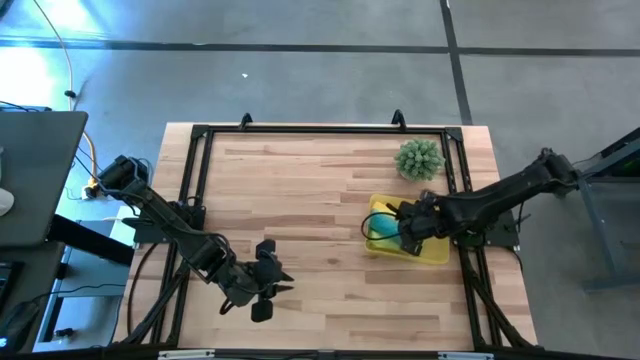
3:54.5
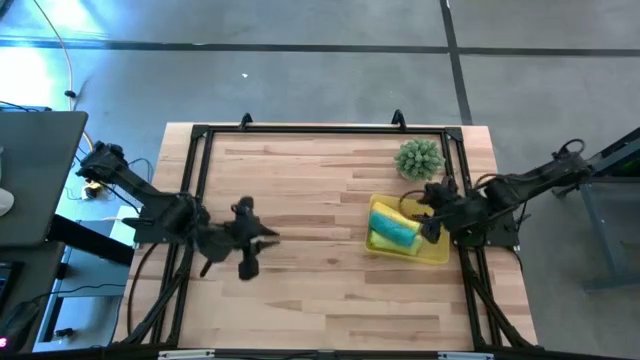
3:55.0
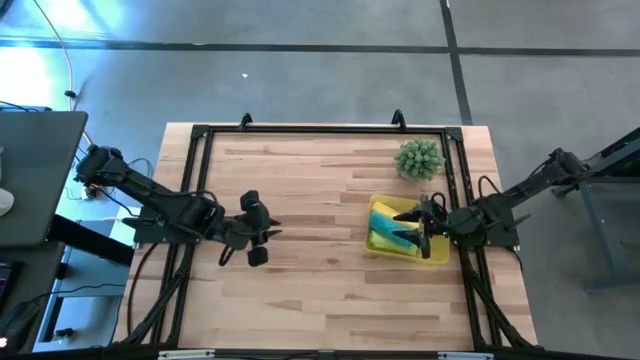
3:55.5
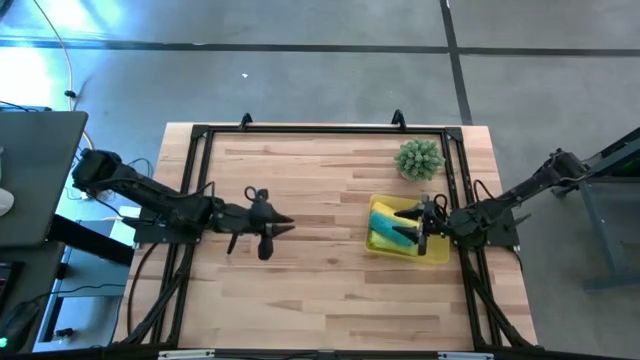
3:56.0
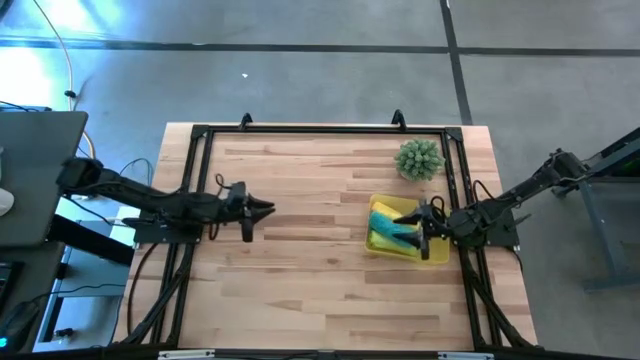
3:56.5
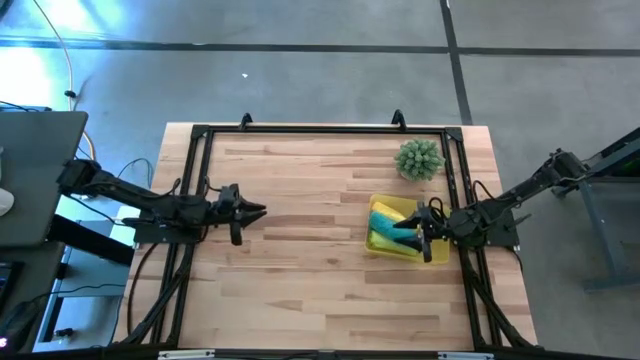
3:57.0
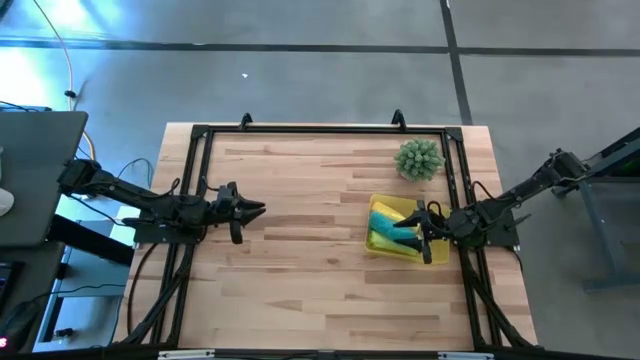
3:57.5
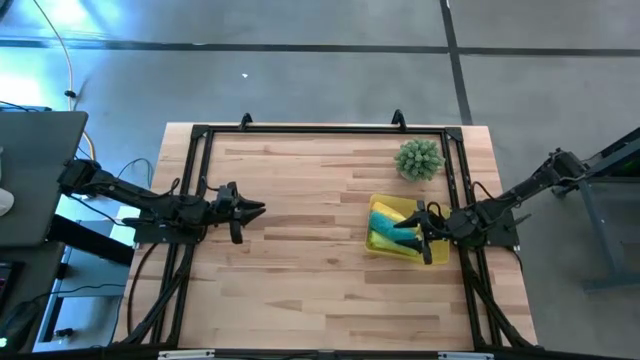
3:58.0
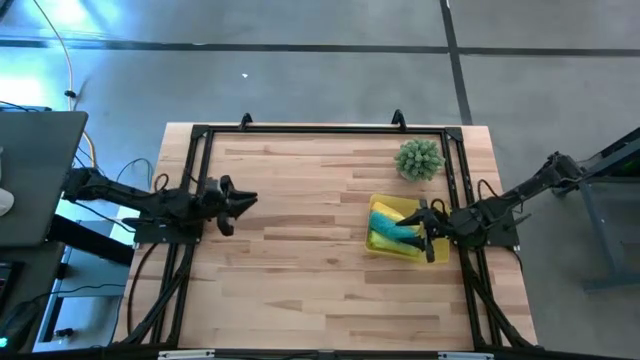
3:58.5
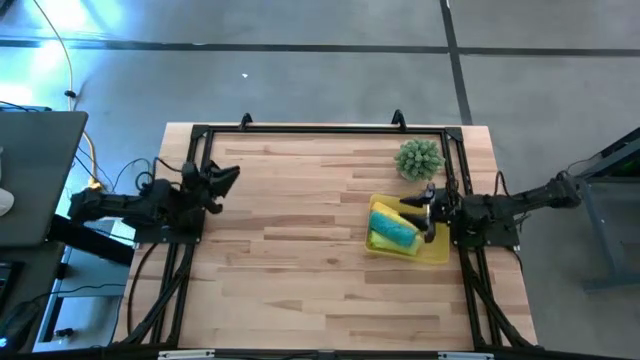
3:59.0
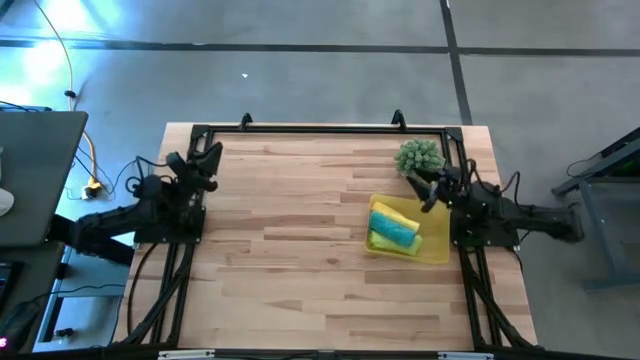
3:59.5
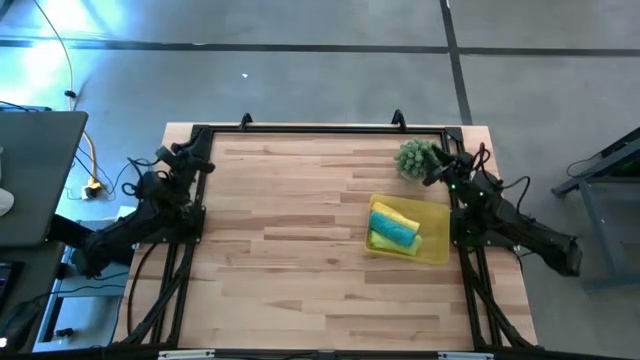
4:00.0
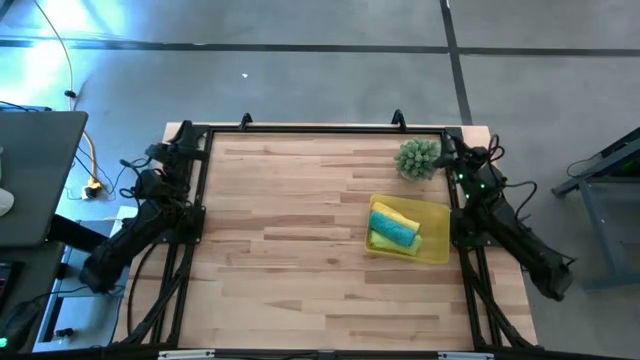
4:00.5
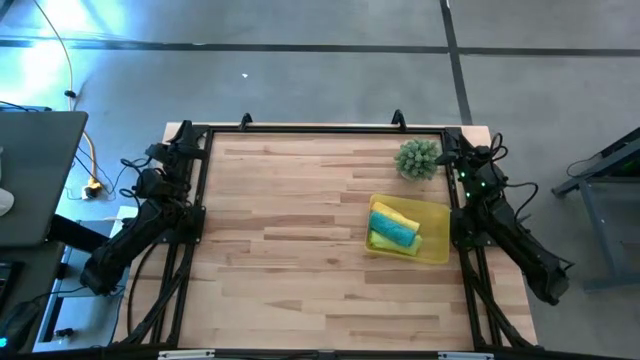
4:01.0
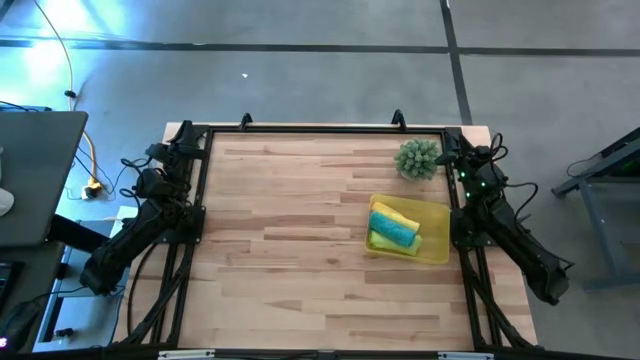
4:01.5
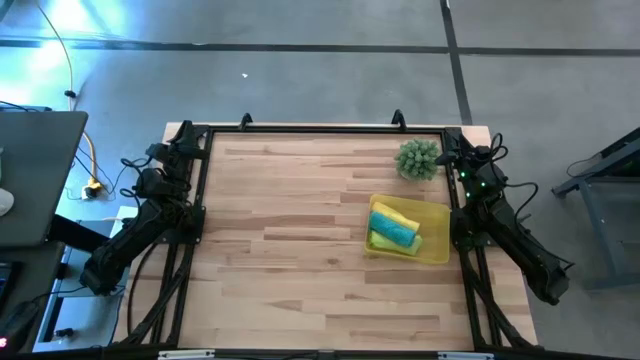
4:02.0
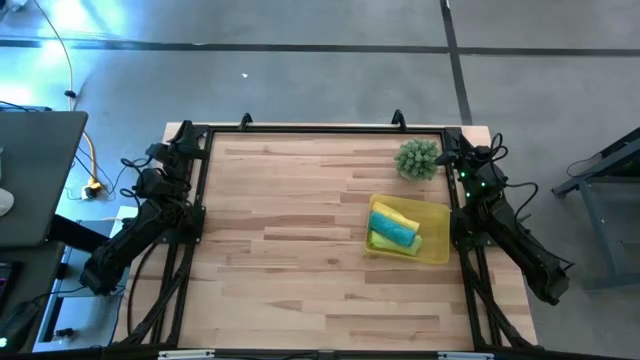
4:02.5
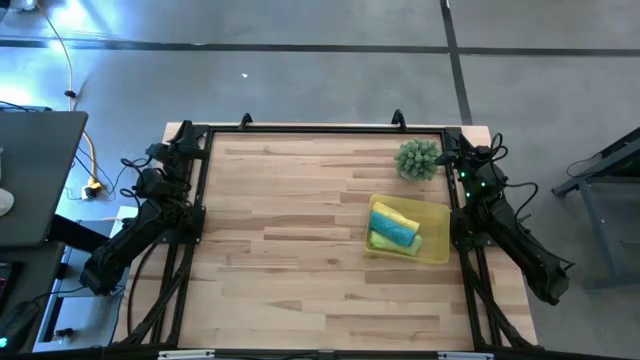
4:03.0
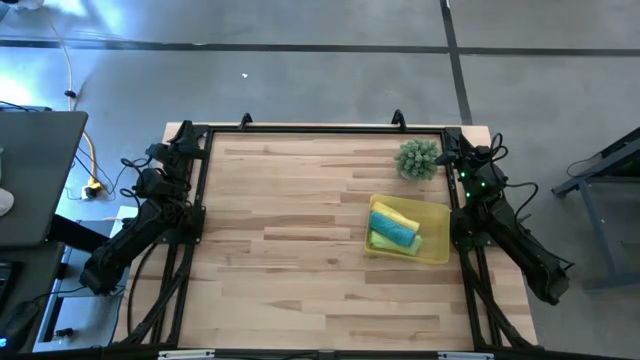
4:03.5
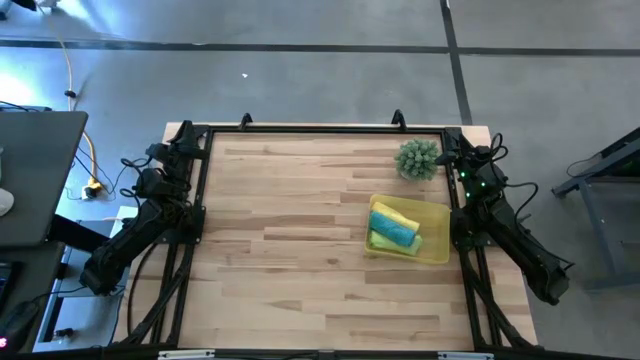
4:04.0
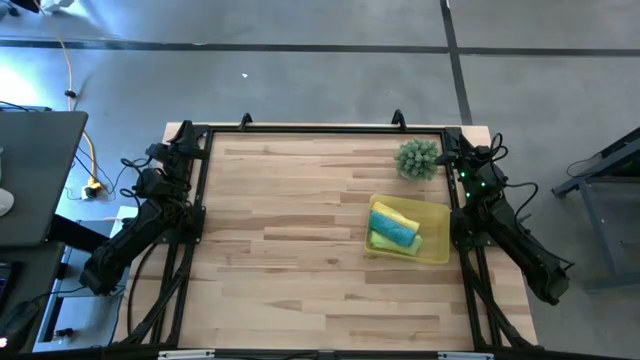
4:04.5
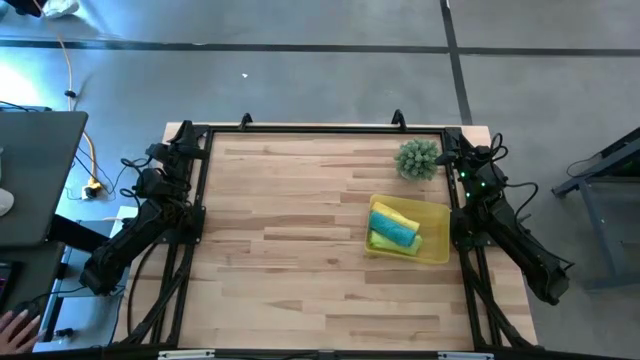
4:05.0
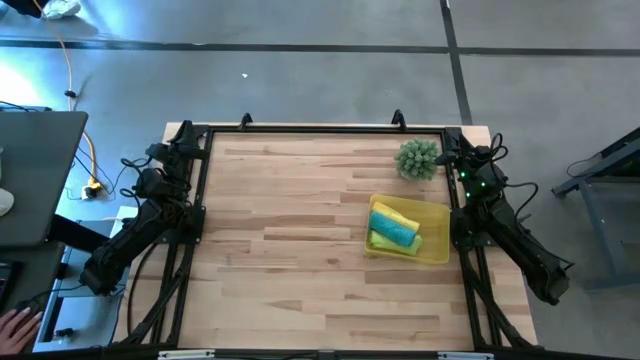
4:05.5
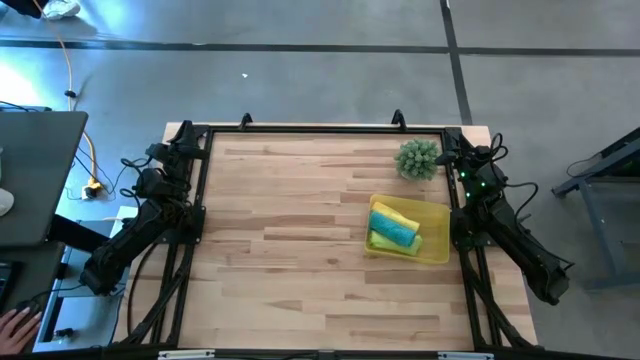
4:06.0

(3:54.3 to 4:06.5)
Task: Roll microfiber towels into tight, uniform cylinder then place into a basket
Return to Home Position

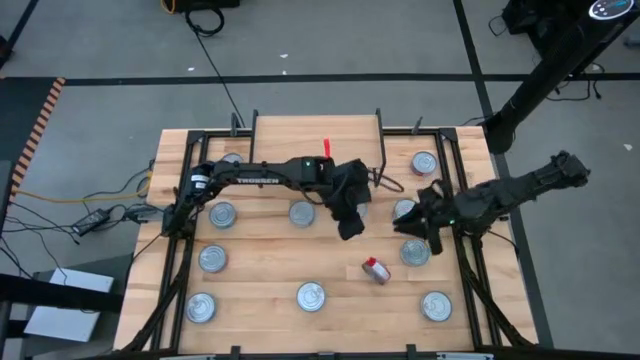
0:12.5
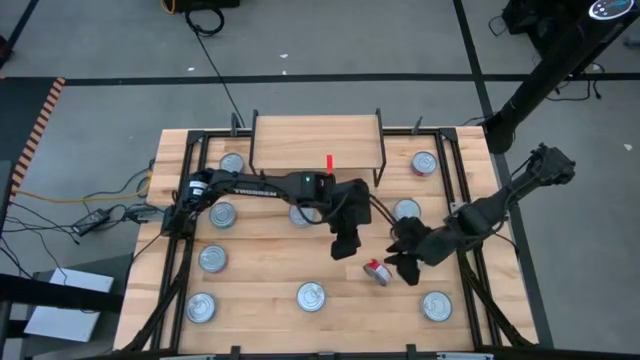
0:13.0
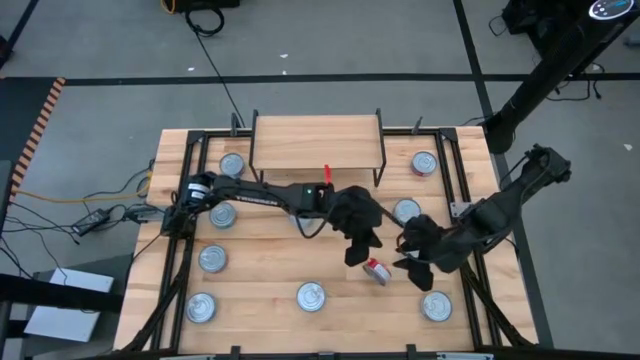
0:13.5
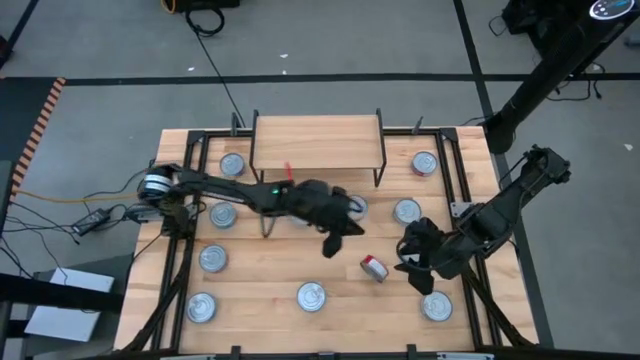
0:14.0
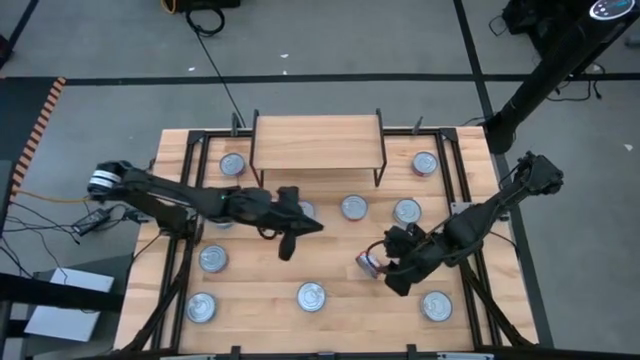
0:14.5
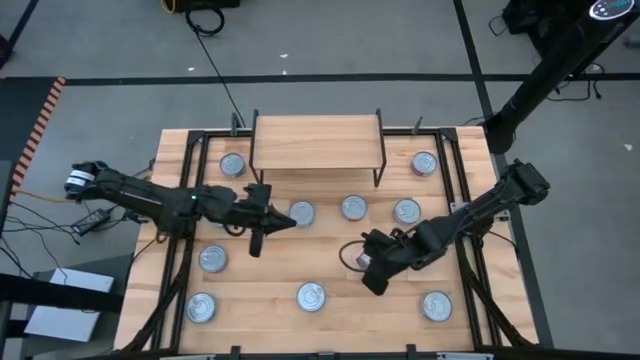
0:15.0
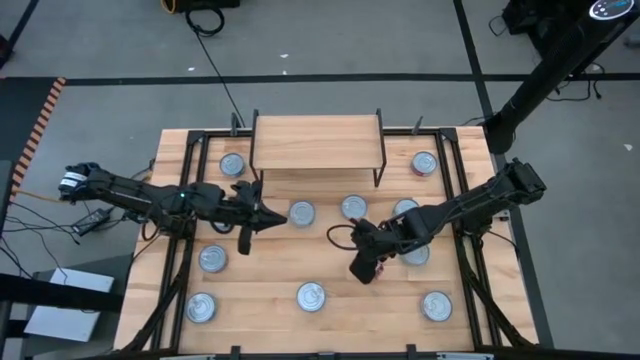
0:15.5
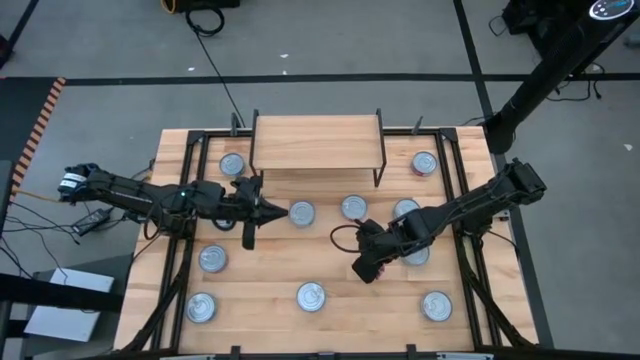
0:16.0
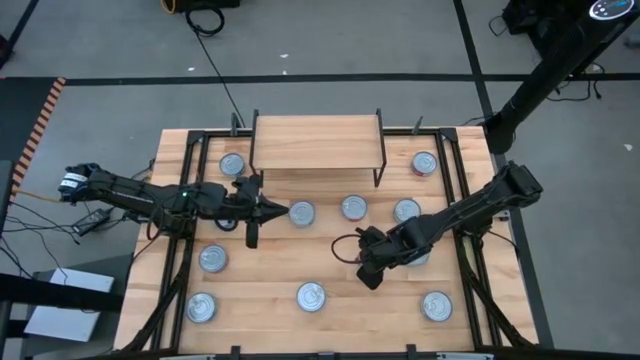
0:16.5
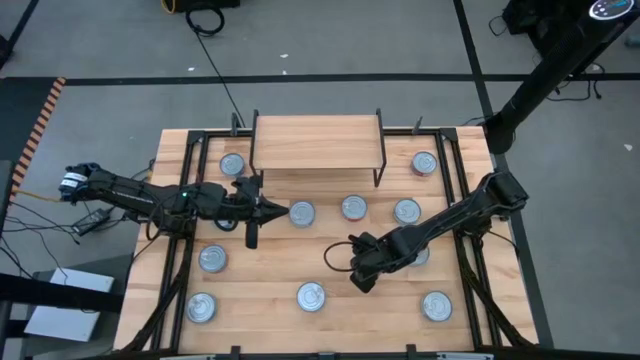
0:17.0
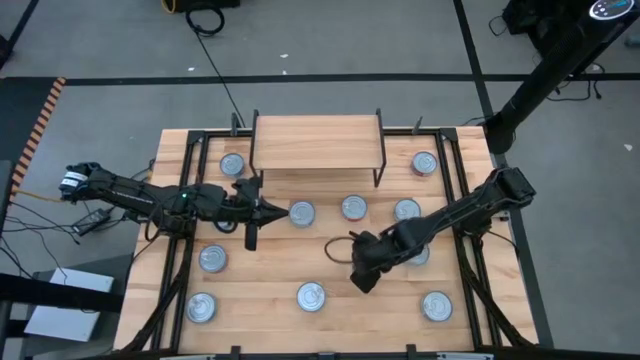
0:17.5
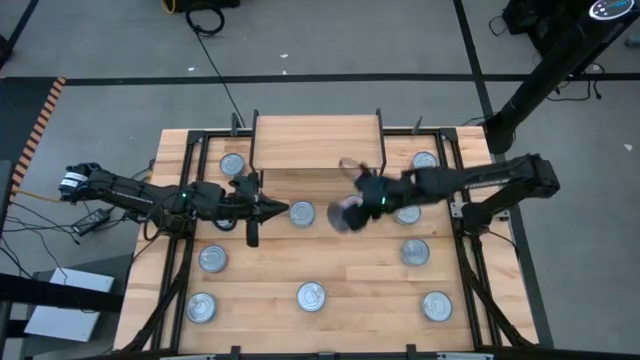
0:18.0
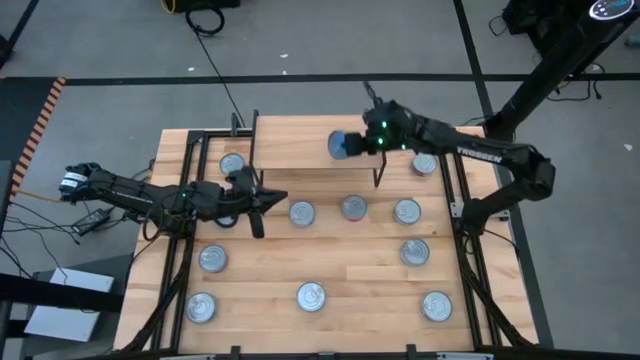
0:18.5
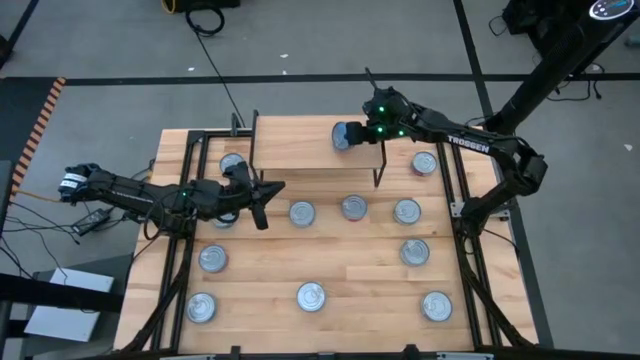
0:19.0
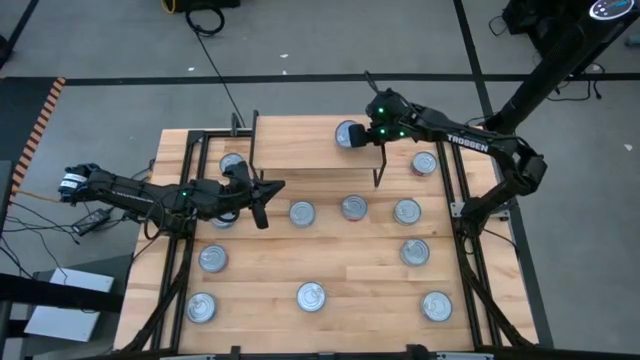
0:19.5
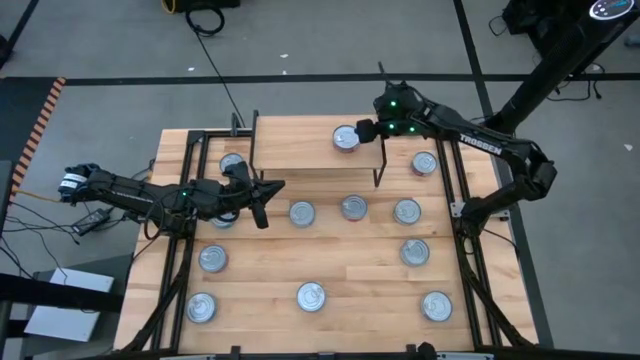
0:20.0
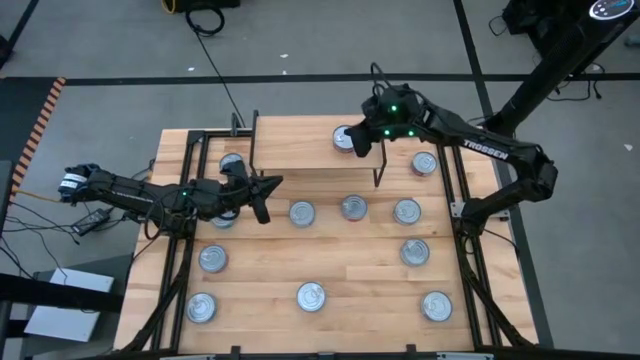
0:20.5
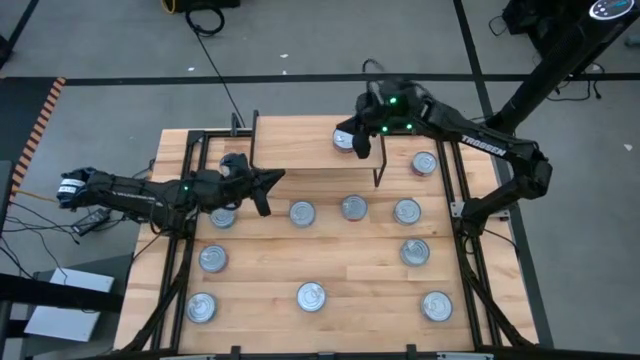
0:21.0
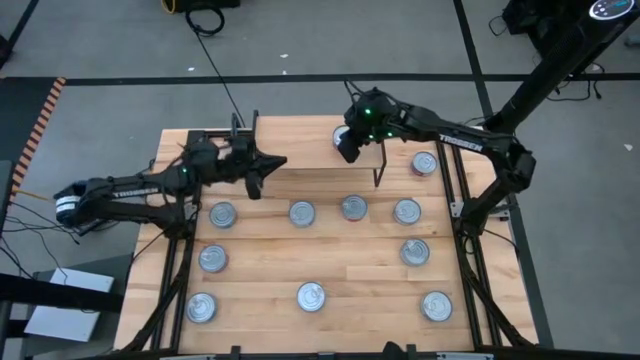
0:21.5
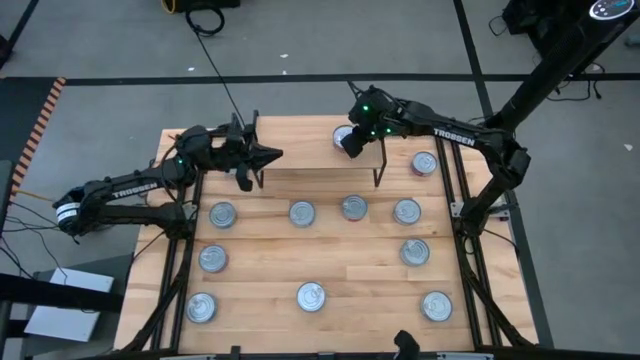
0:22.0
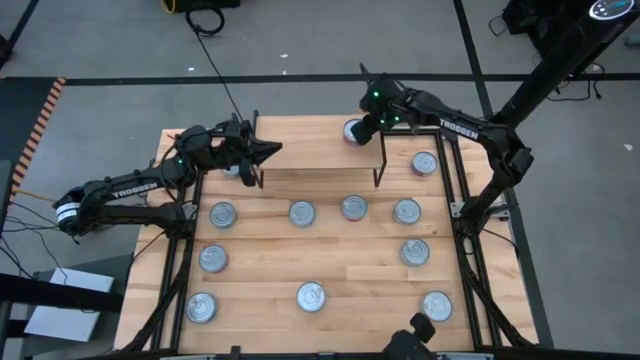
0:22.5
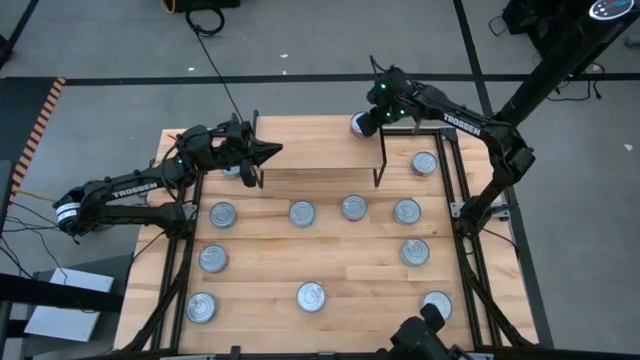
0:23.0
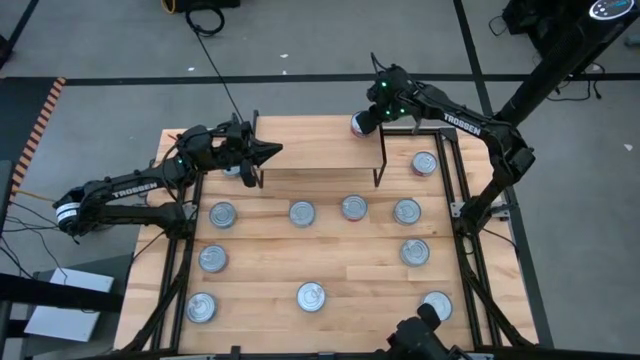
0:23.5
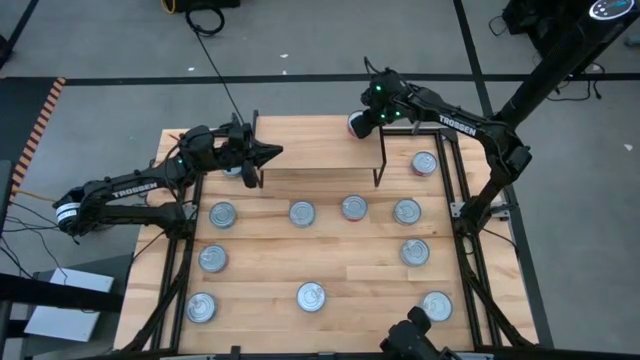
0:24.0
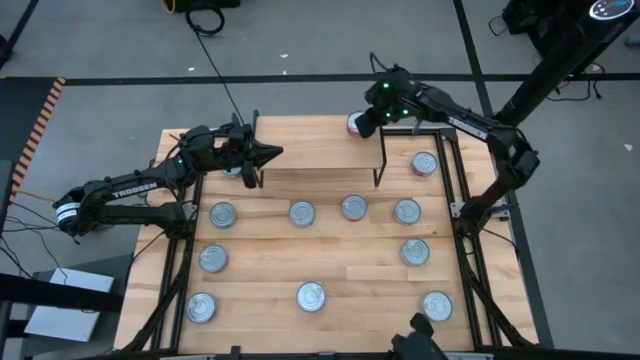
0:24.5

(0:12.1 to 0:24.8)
Task: Stack canned seafood by type on shelf
Put the right red tuna can on the shelf
